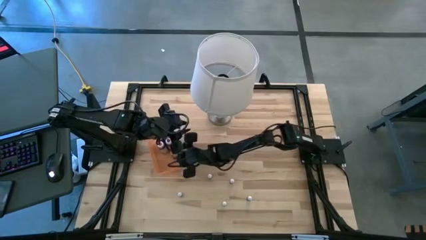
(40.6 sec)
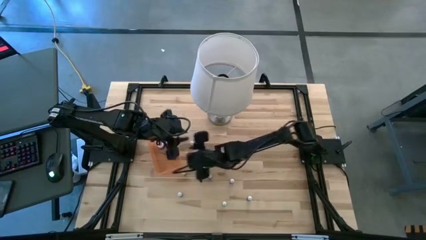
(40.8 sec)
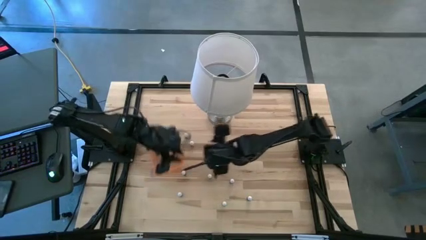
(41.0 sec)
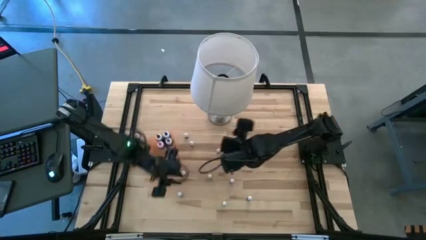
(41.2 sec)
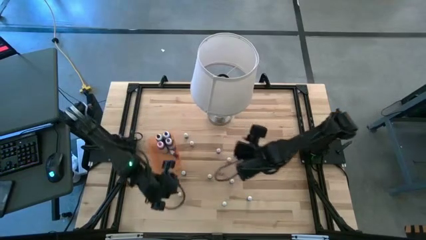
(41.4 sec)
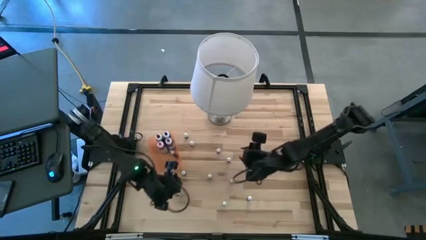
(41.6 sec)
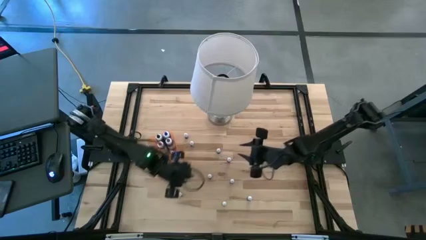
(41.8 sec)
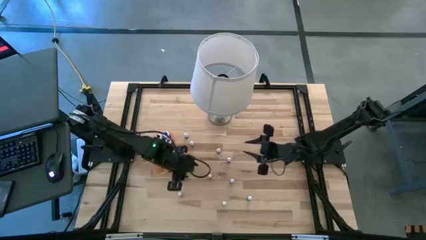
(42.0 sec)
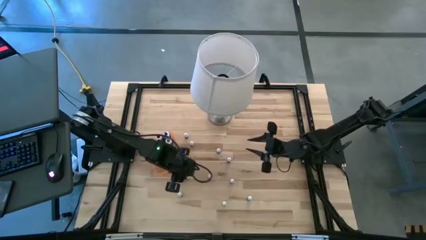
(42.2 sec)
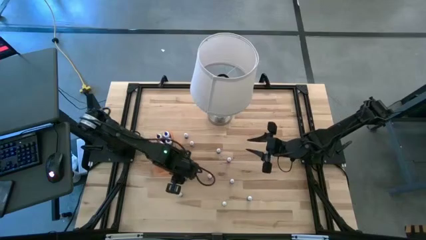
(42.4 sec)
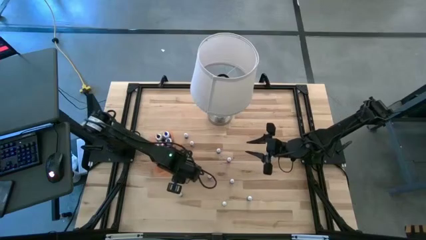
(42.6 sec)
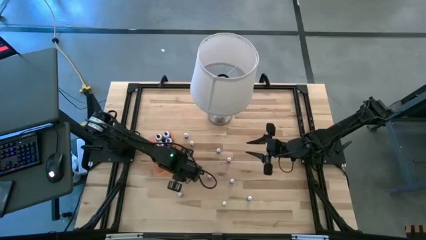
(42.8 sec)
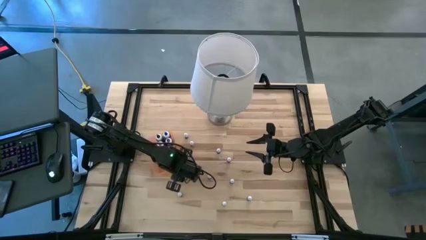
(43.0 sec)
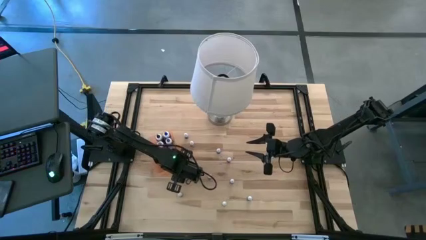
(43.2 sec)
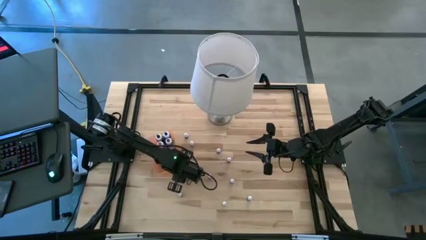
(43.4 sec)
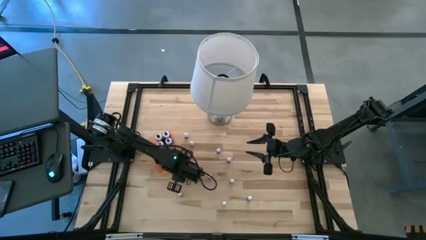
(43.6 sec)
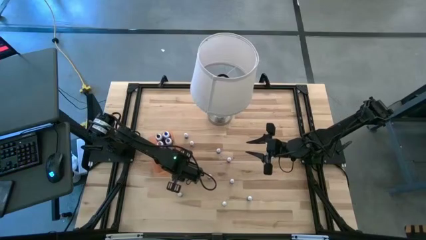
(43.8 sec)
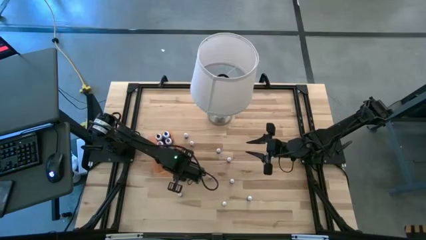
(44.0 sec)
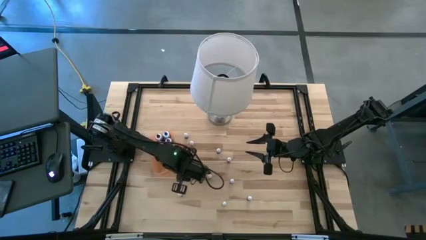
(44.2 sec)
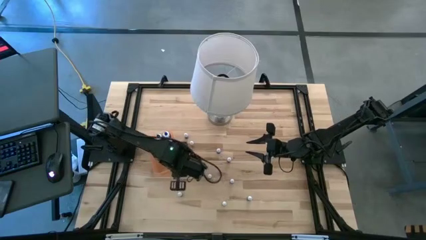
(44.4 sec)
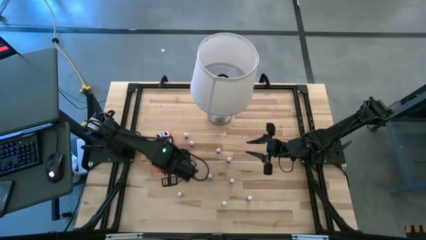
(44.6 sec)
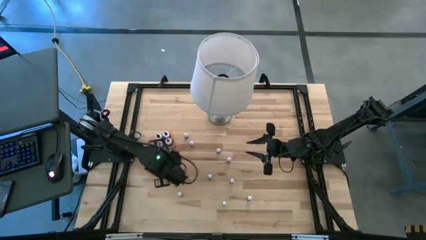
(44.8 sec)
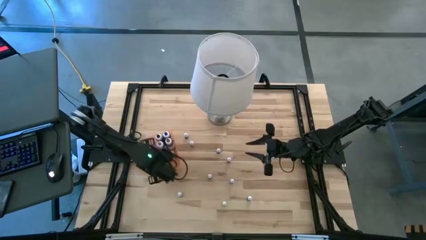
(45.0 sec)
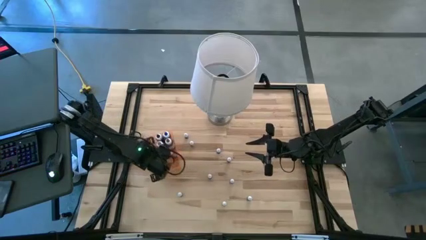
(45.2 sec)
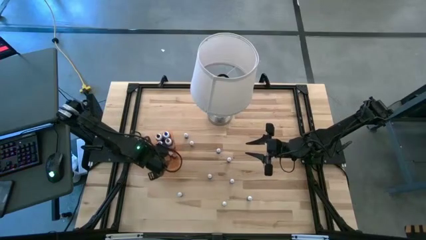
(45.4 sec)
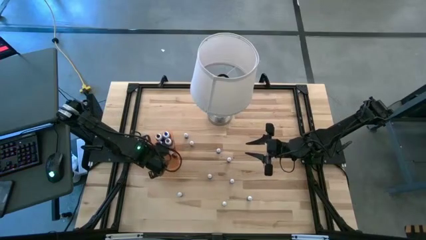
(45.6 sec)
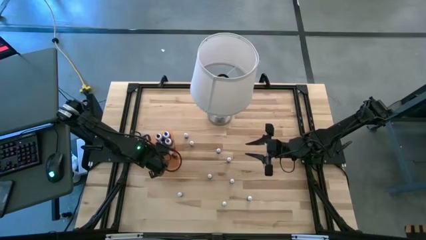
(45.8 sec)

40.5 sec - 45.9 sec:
Task: Pick & Place food coloring
Put the black food coloring bottle into the orange bin

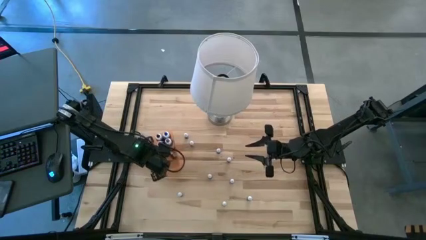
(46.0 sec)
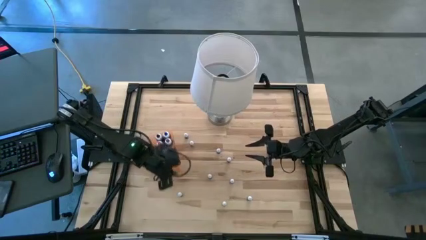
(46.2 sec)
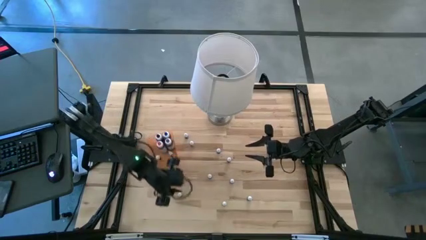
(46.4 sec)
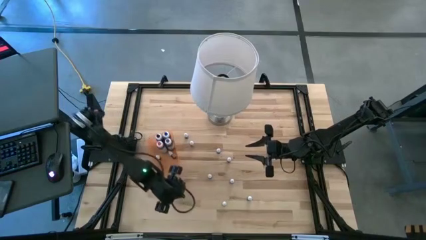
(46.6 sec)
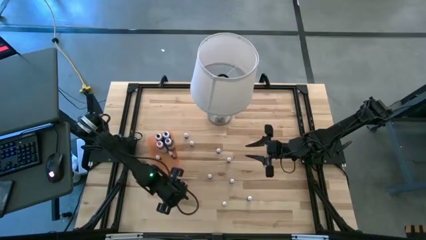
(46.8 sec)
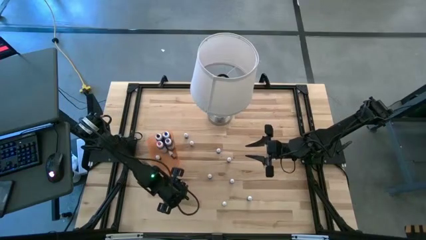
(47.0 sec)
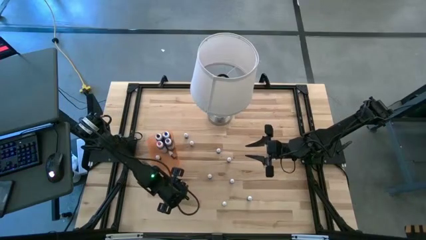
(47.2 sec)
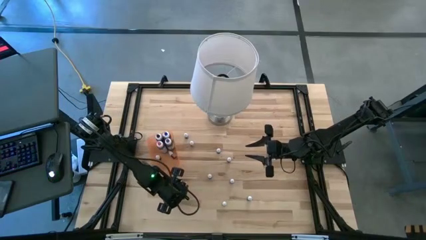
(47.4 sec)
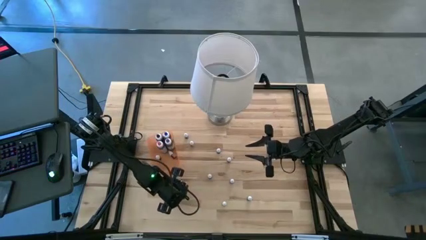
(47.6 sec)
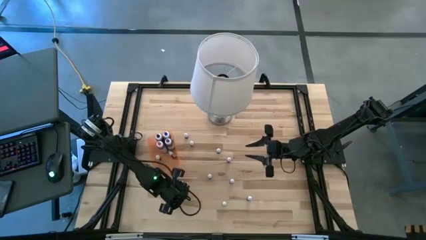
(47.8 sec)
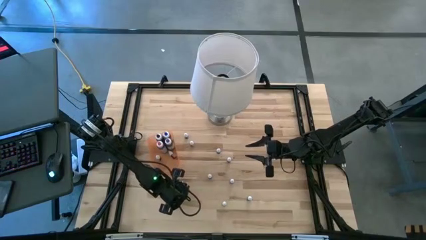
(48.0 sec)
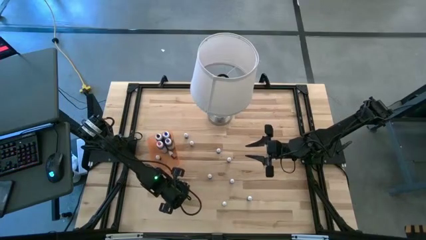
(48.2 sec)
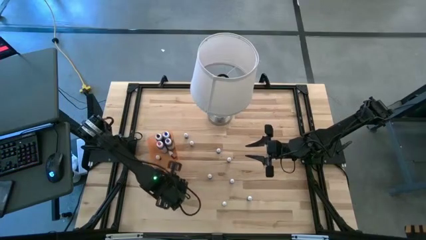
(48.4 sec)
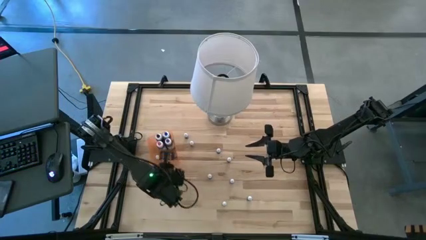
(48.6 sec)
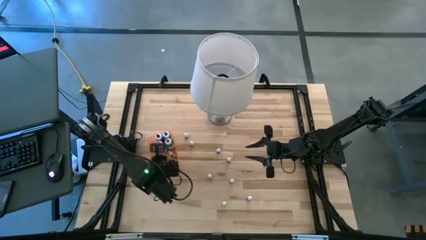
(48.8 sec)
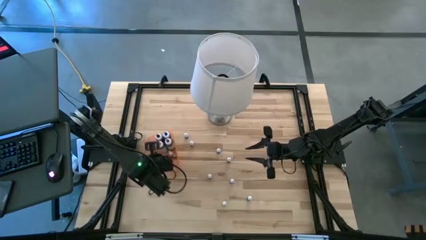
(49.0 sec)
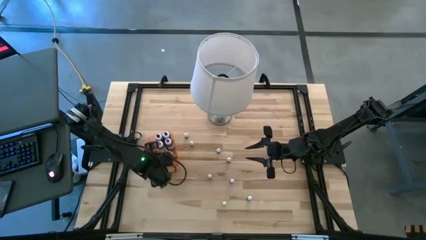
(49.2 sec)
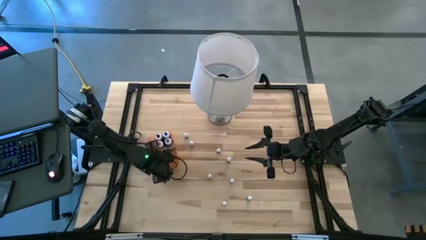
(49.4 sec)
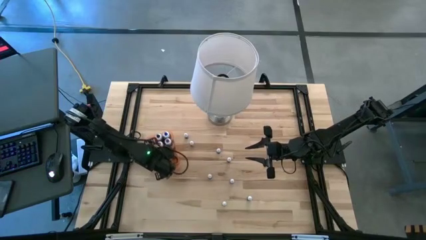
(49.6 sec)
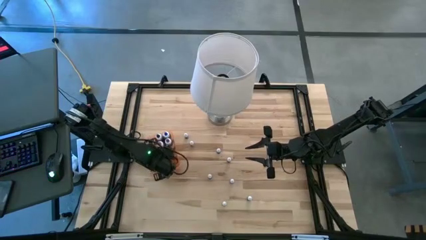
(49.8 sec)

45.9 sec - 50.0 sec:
Put the dark green food coloring bottle into the orange bin

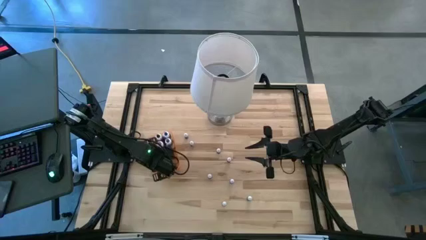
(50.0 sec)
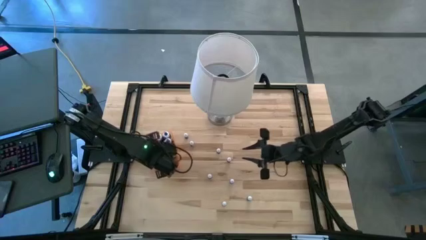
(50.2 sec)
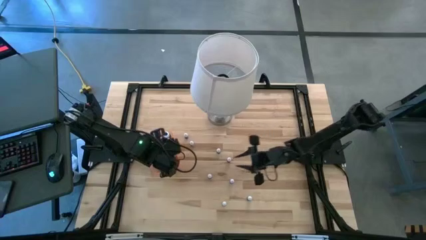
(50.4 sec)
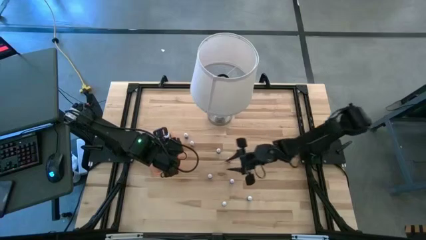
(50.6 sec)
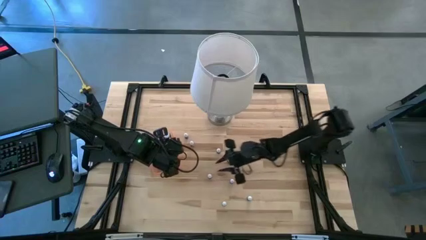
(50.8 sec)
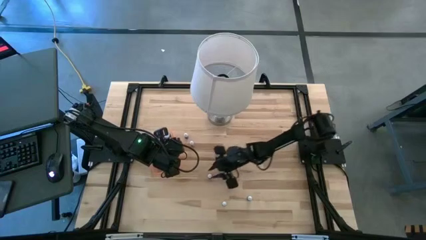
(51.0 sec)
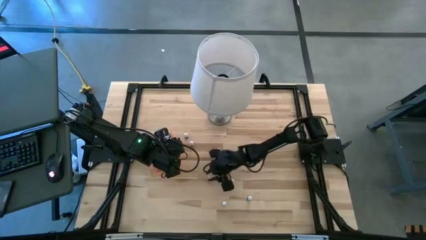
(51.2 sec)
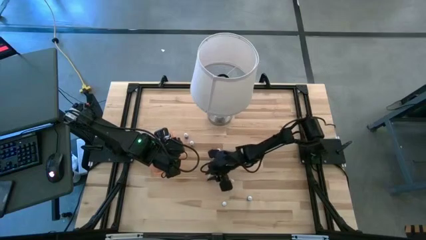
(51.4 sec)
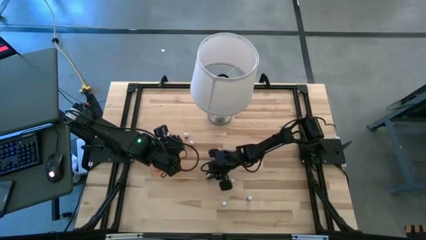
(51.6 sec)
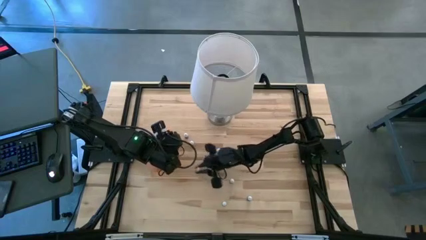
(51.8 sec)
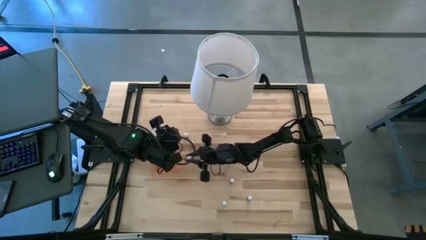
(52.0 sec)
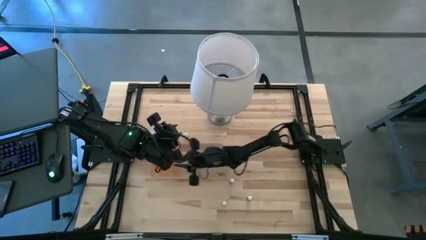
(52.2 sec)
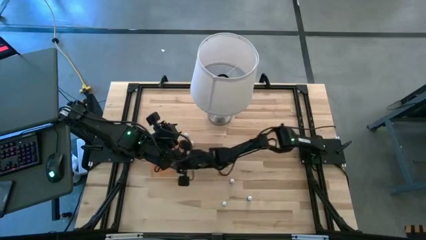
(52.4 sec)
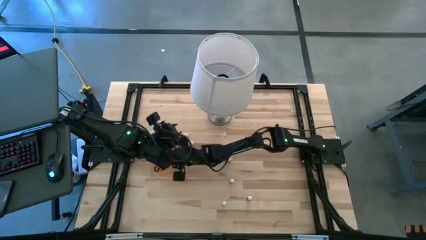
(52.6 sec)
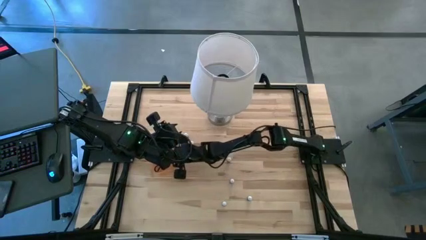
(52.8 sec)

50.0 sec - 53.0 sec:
Put the purple food coloring bottle into the orange bin
